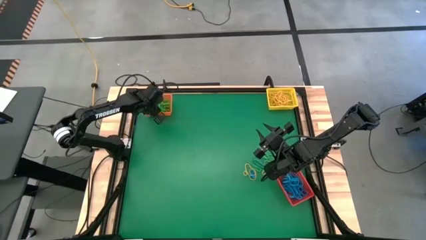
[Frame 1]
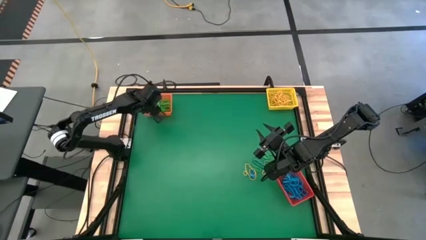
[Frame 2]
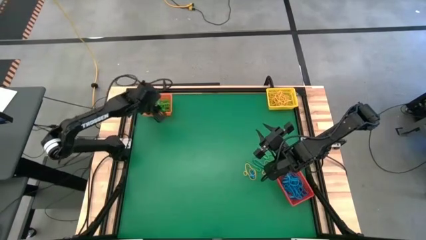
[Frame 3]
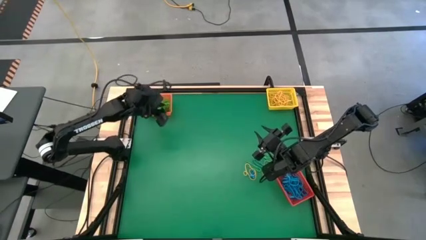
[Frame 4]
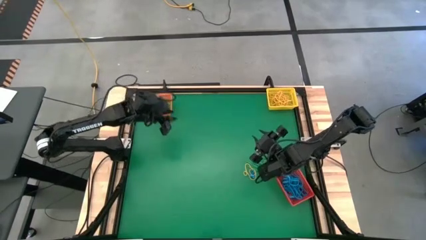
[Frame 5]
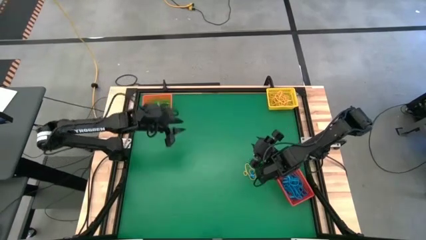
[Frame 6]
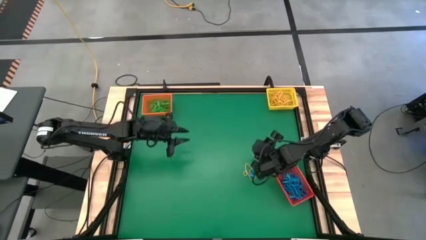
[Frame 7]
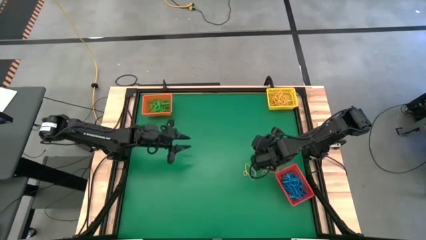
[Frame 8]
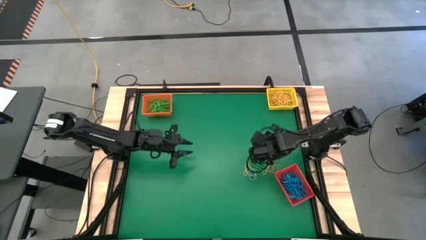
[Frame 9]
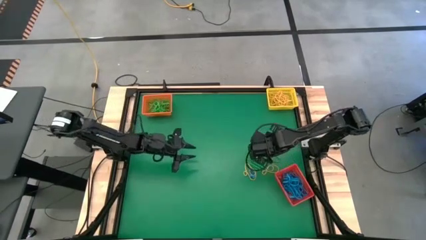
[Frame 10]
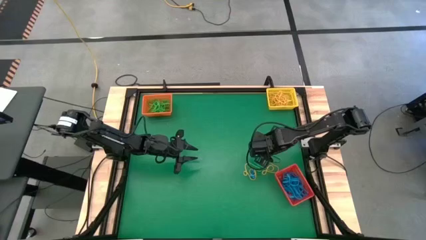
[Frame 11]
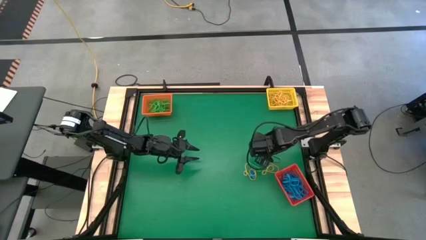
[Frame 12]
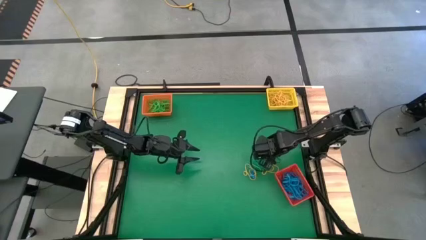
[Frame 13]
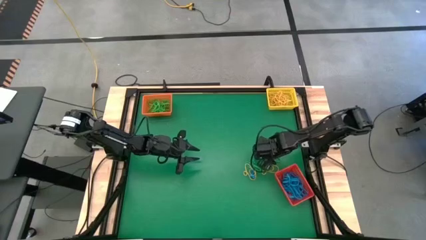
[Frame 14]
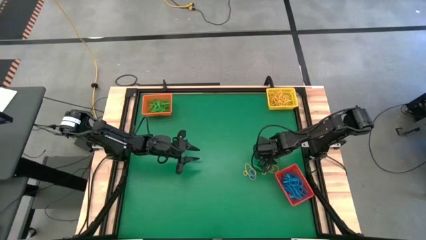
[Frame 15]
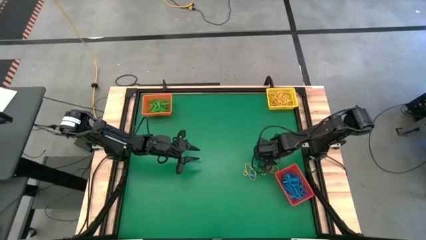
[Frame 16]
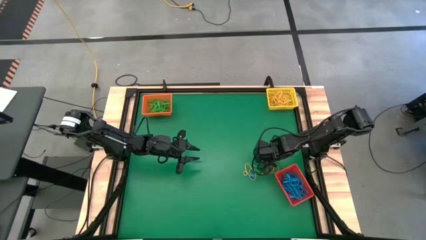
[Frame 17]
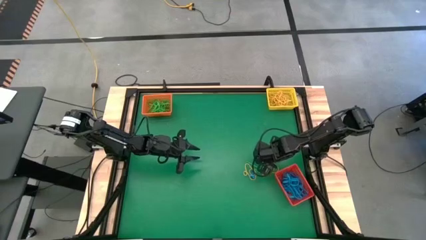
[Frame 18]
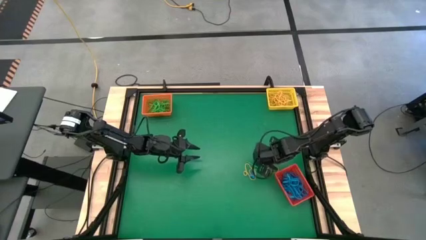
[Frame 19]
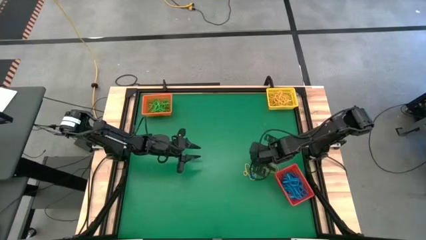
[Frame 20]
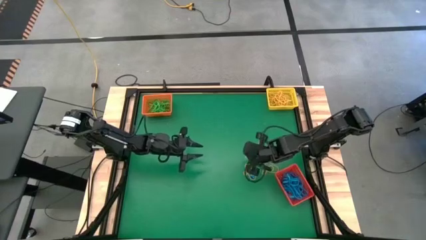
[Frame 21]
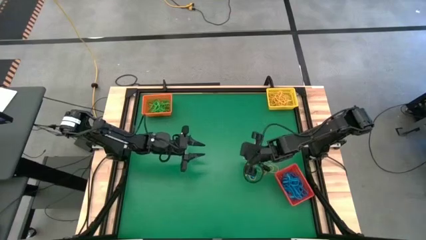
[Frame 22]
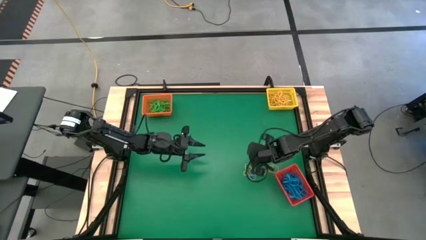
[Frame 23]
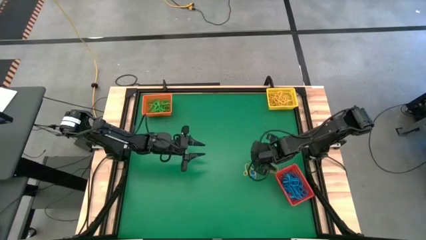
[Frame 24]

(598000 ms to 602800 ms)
Task: Sort rubber bands into baskets
Put the green rubber band into the orange bin

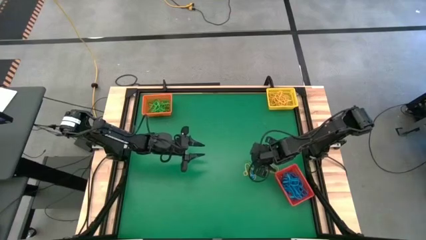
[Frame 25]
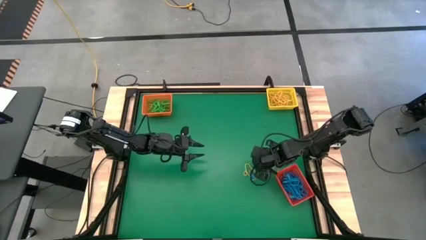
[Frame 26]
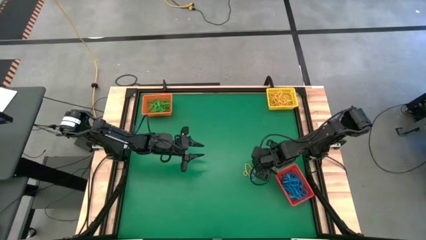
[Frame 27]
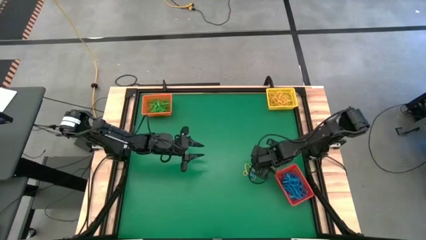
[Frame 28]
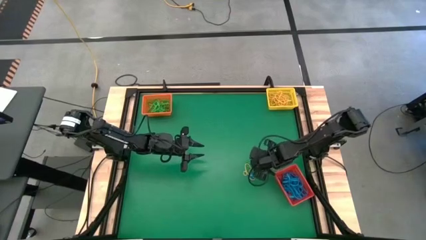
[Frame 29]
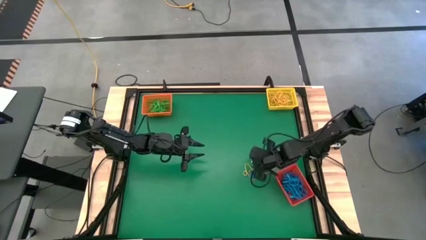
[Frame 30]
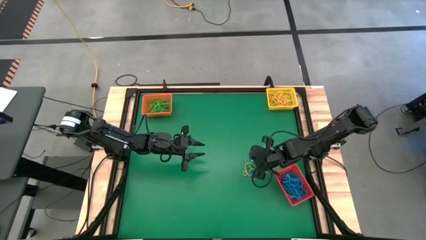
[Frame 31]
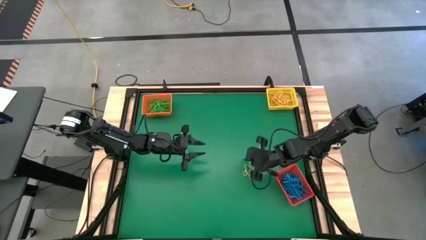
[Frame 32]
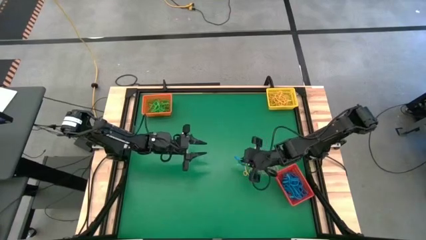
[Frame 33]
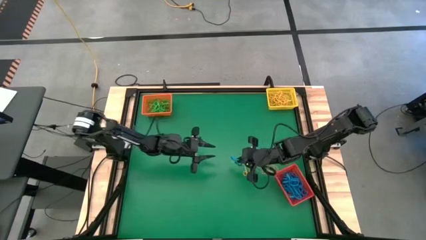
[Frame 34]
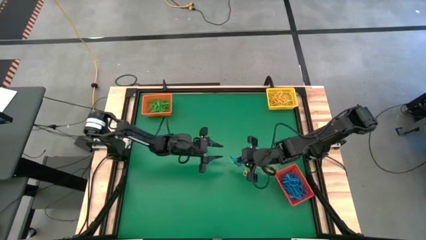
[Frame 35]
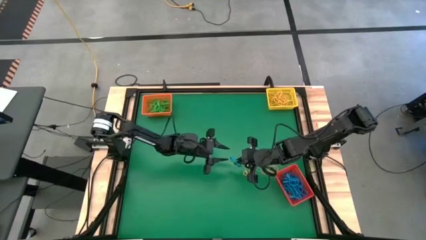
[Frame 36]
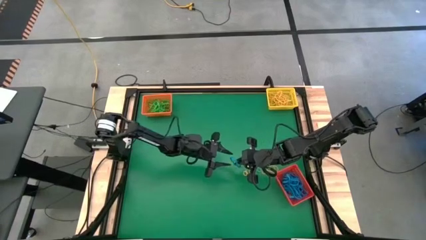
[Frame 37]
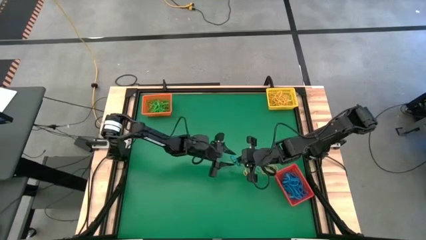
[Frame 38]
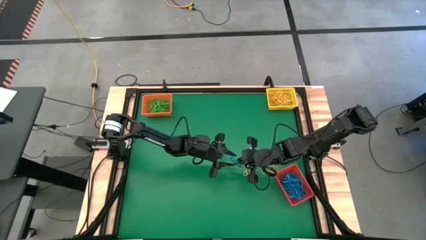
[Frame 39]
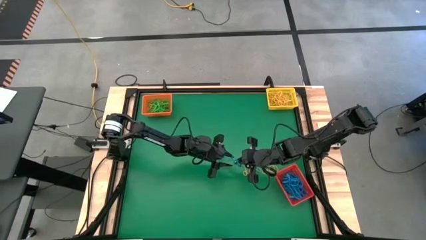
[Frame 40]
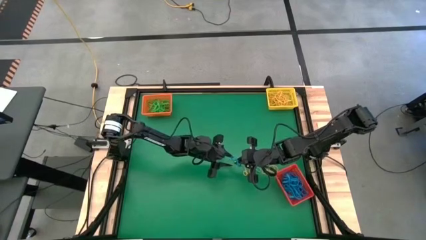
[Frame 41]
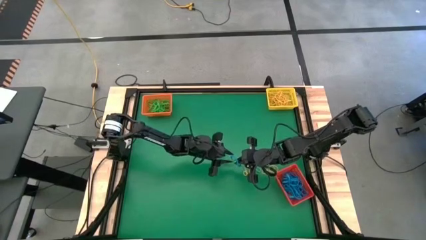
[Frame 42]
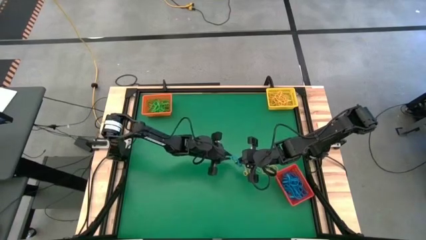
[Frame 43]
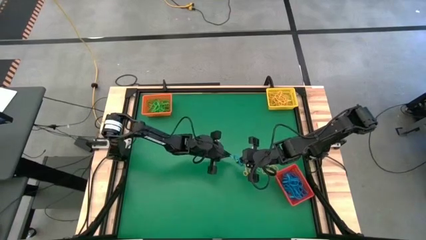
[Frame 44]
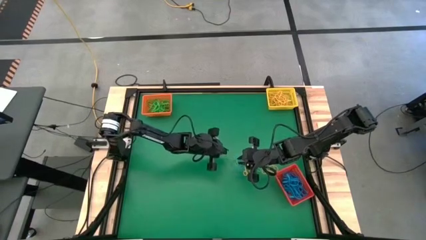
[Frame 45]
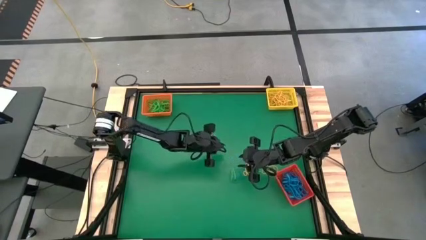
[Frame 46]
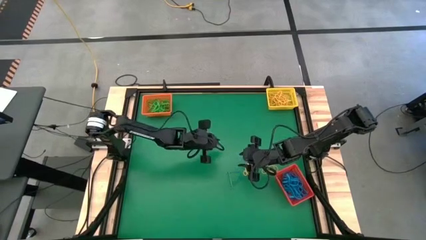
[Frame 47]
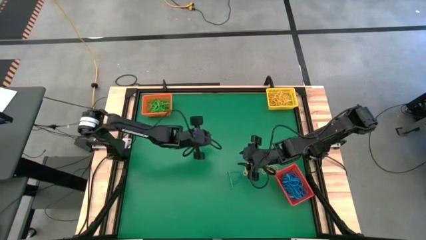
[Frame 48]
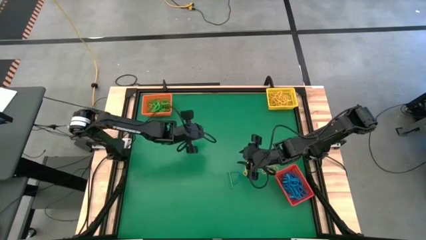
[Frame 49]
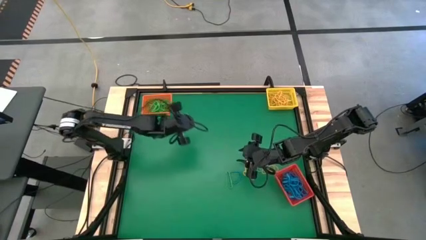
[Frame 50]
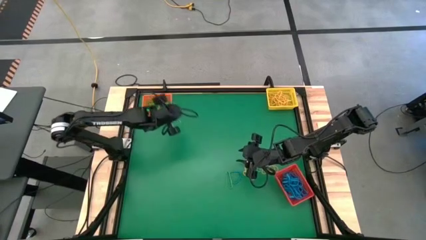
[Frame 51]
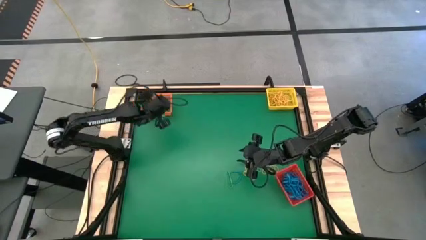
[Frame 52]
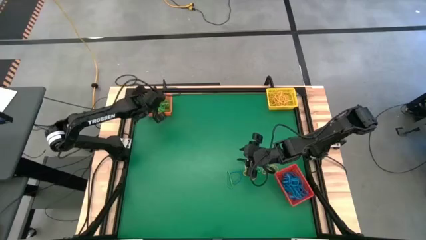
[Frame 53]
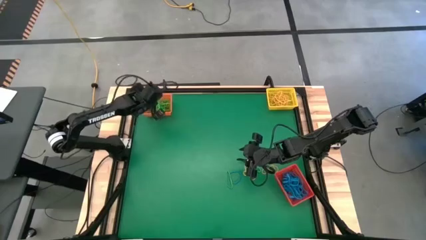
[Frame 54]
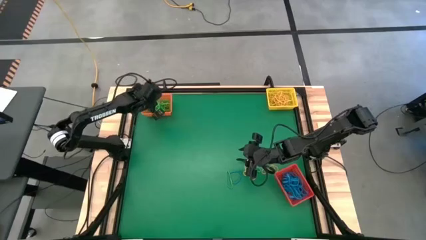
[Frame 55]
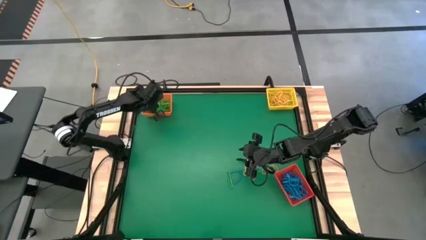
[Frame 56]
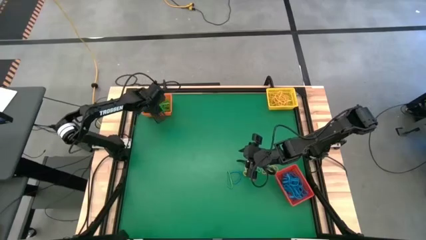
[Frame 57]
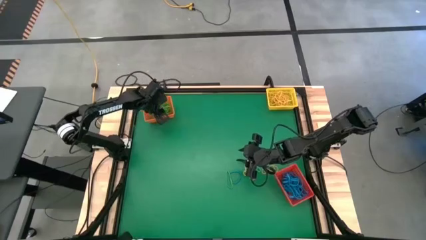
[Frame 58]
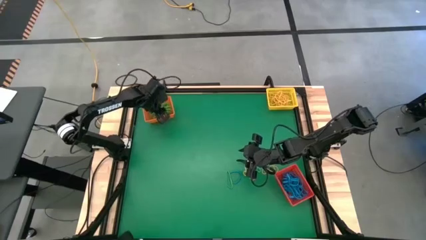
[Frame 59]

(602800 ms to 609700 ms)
Put the green rubber band into the orange bin

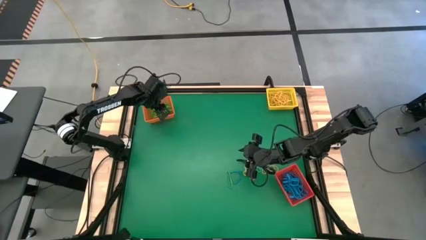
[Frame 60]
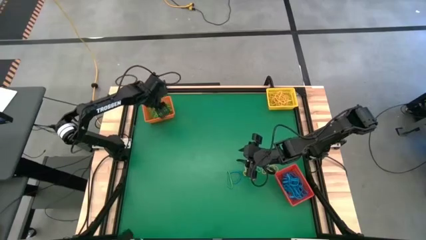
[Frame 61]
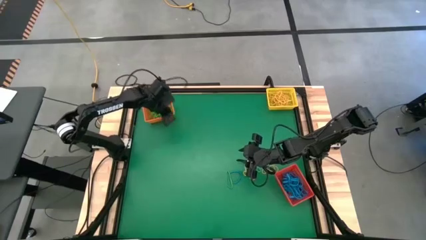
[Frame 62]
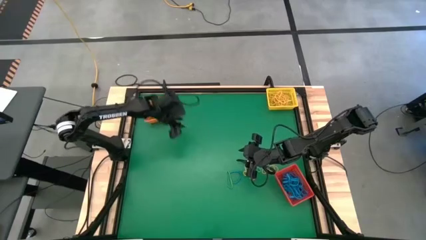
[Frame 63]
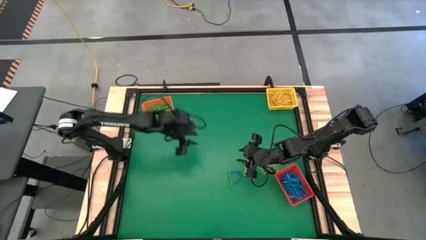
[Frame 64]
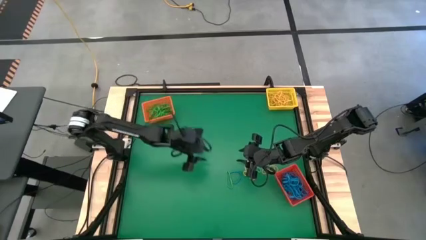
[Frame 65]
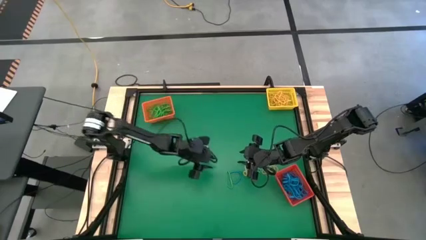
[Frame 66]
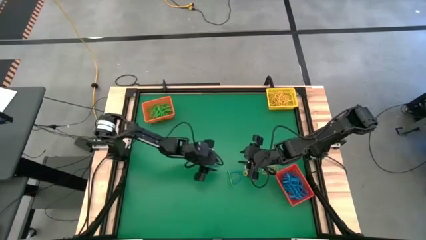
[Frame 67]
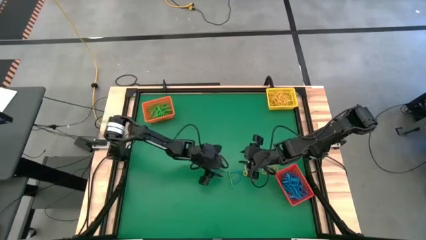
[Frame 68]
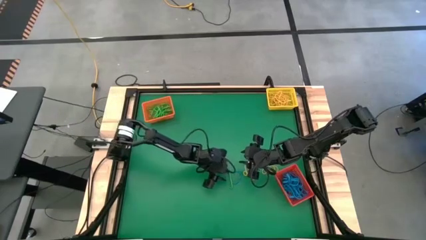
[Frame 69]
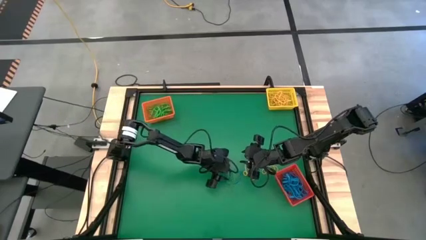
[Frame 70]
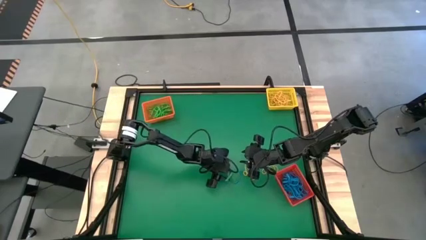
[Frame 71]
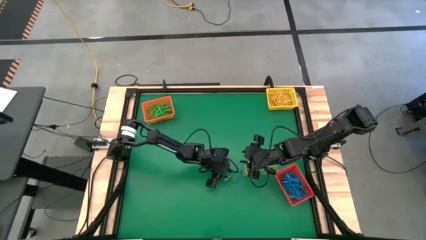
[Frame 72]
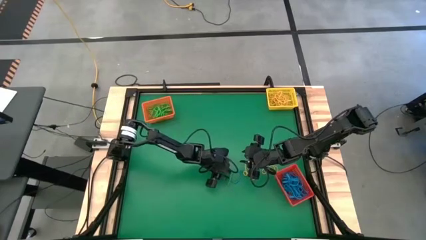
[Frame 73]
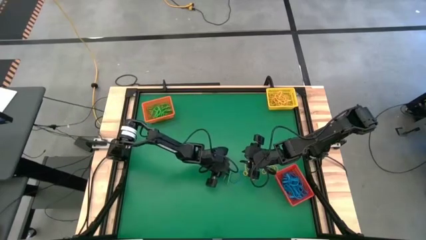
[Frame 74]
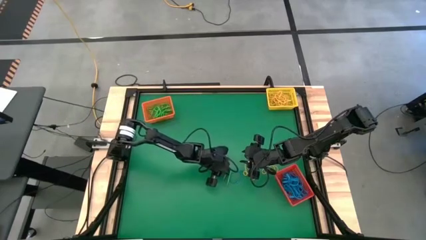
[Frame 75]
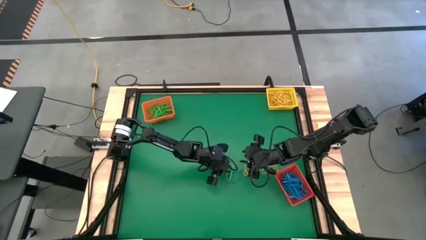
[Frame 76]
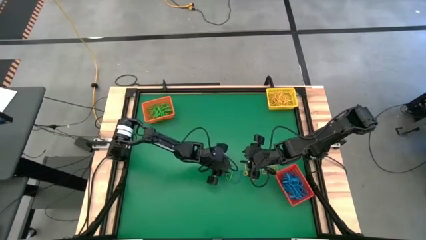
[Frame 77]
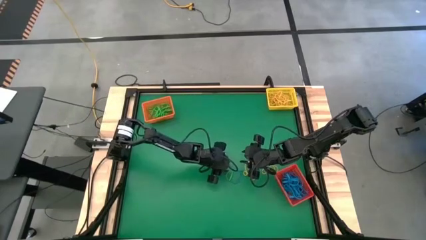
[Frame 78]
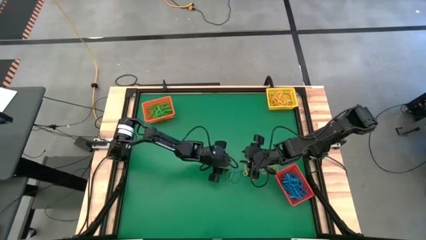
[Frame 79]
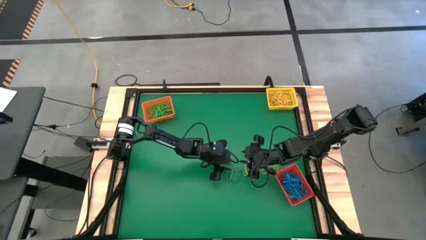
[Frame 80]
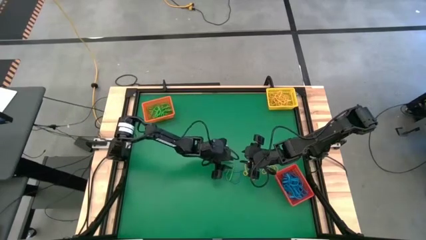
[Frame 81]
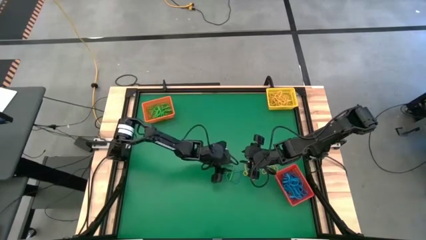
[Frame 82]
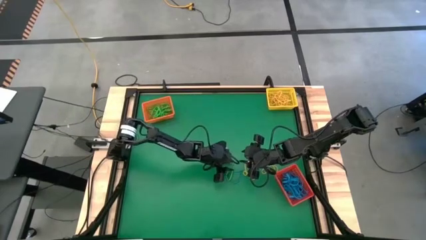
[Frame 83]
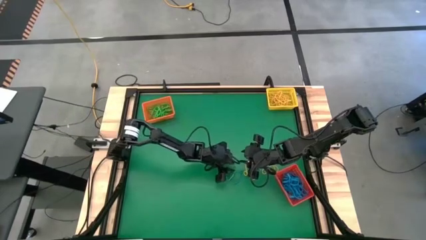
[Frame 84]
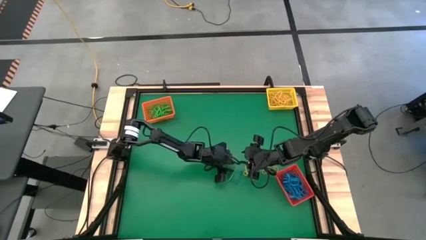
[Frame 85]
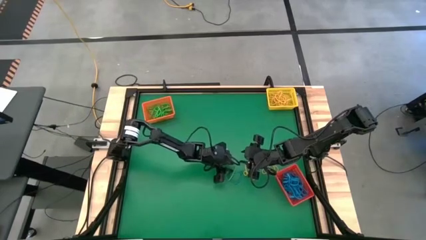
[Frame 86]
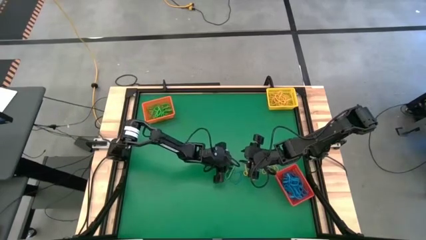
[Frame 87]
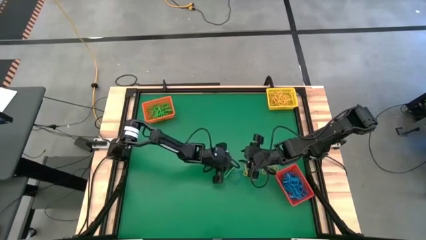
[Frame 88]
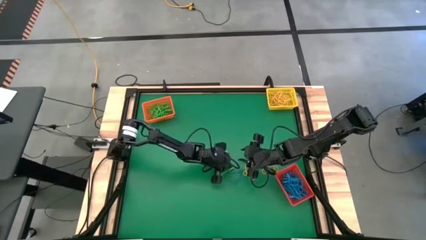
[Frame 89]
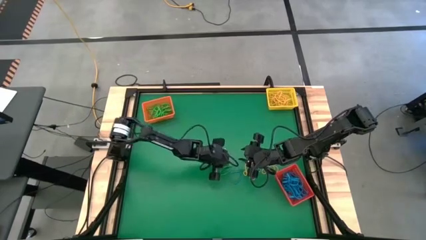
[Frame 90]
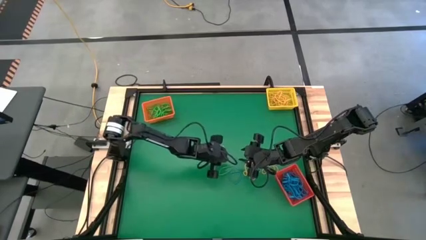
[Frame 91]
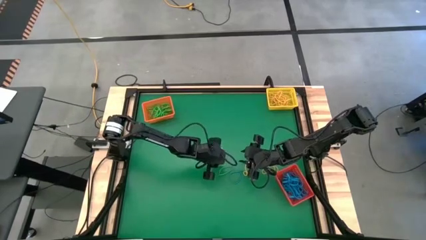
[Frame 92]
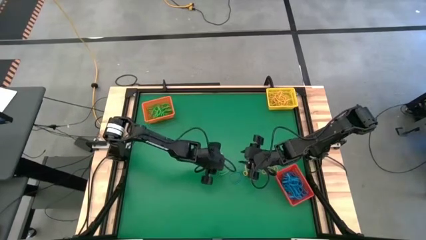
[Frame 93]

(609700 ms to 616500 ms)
Put the green rubber band into the orange bin
